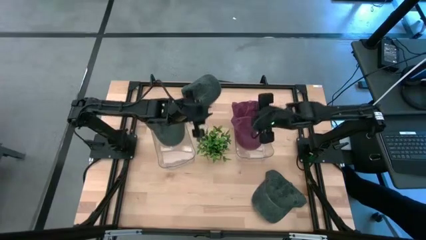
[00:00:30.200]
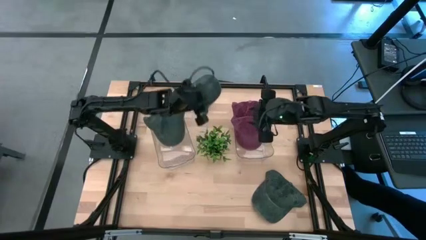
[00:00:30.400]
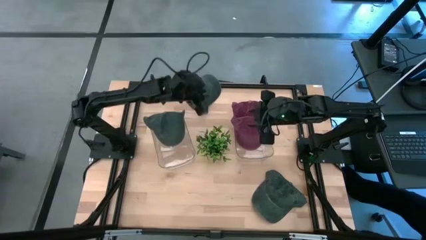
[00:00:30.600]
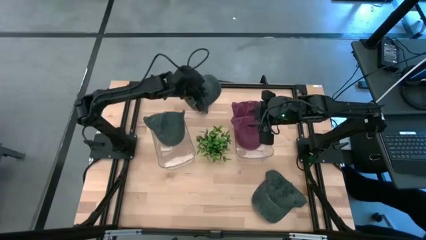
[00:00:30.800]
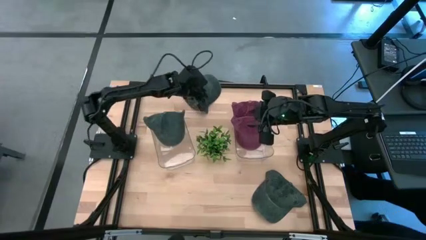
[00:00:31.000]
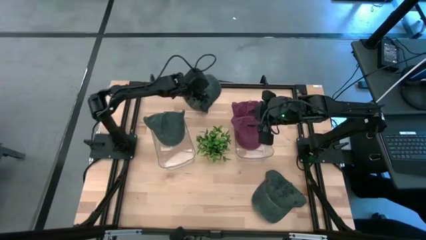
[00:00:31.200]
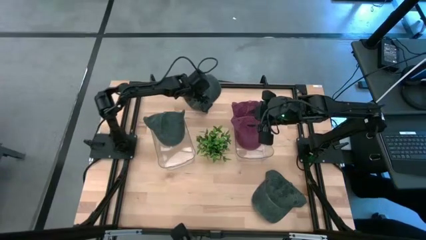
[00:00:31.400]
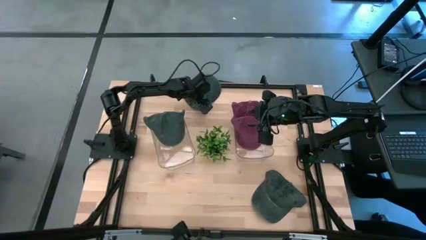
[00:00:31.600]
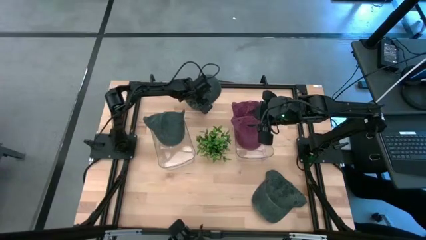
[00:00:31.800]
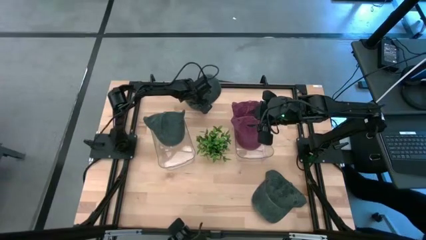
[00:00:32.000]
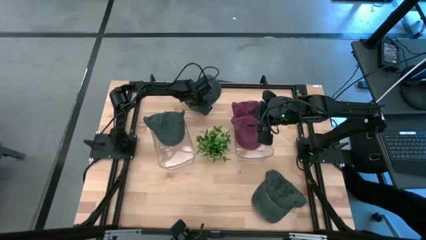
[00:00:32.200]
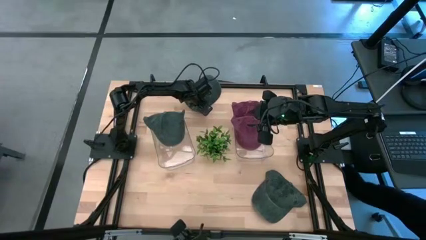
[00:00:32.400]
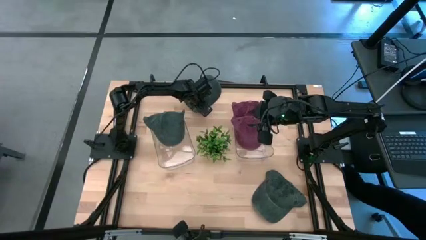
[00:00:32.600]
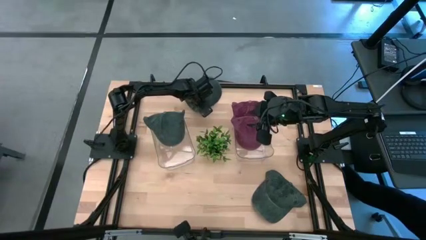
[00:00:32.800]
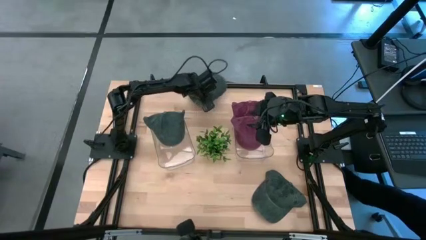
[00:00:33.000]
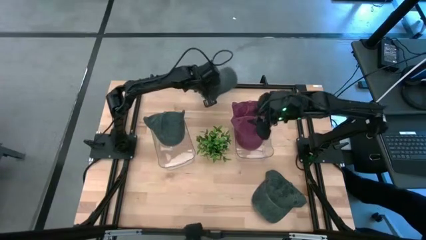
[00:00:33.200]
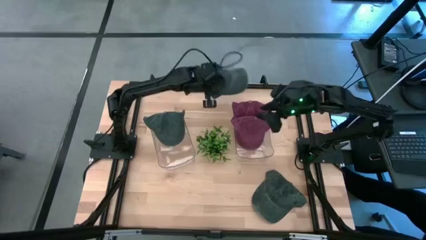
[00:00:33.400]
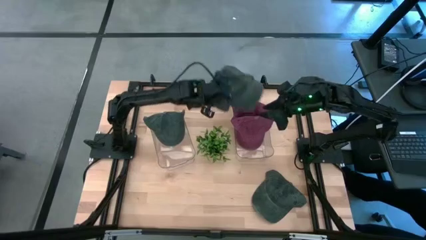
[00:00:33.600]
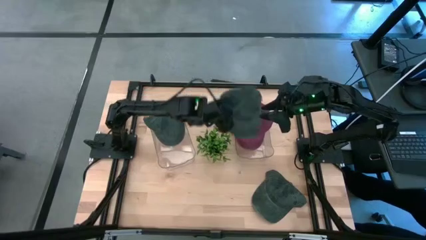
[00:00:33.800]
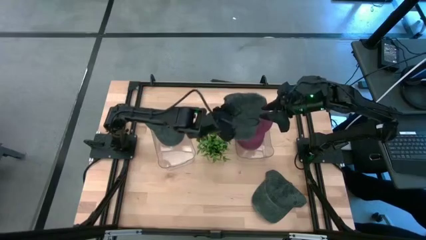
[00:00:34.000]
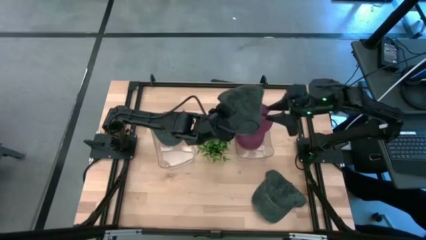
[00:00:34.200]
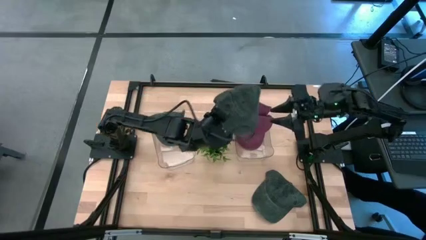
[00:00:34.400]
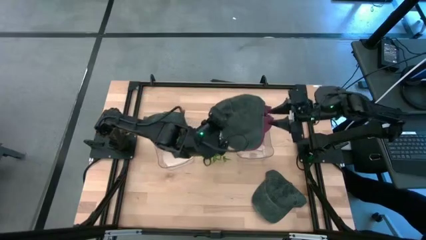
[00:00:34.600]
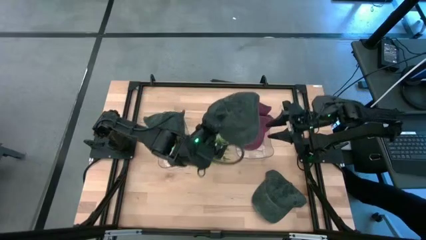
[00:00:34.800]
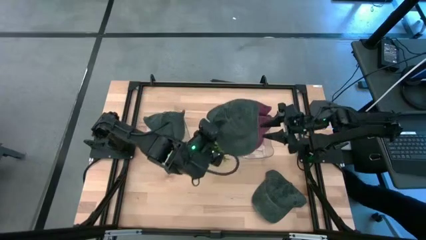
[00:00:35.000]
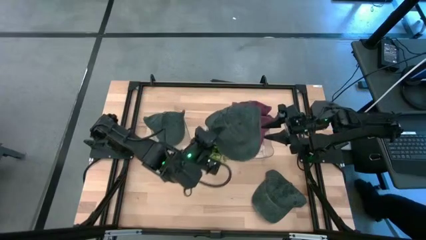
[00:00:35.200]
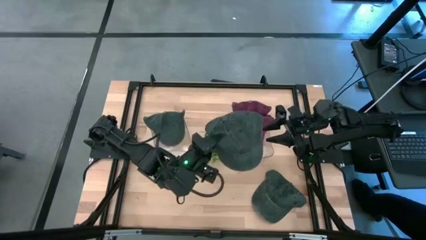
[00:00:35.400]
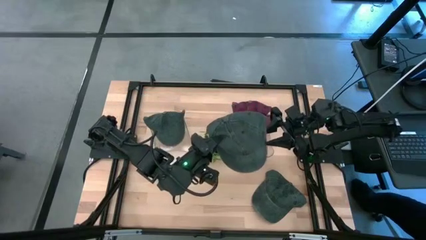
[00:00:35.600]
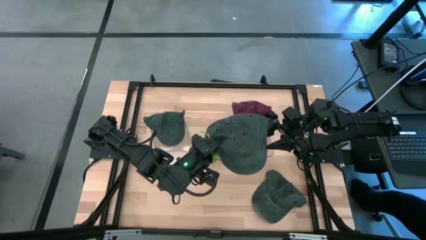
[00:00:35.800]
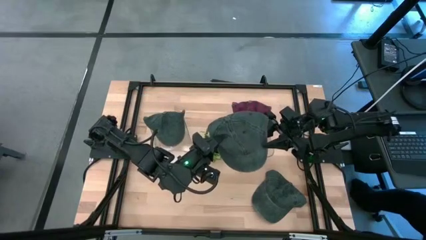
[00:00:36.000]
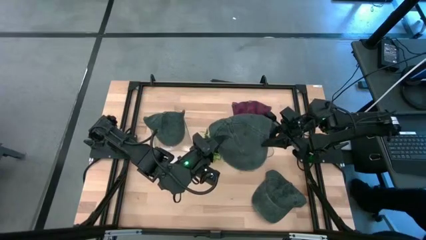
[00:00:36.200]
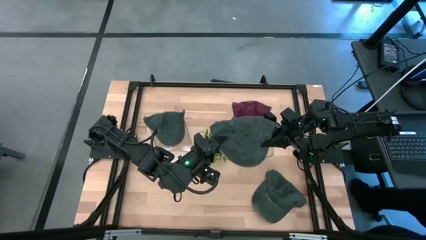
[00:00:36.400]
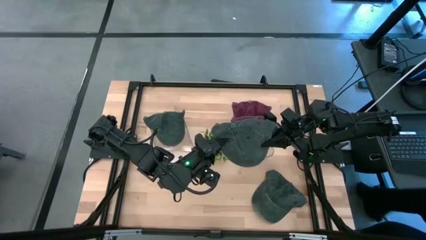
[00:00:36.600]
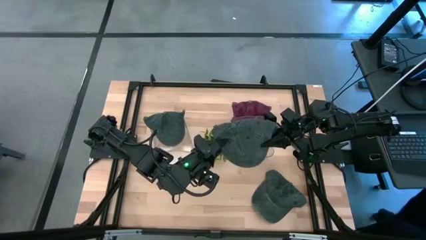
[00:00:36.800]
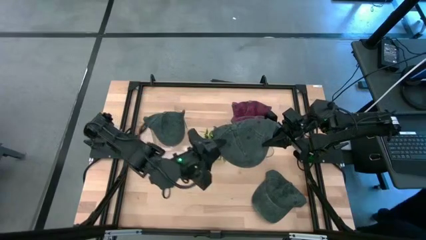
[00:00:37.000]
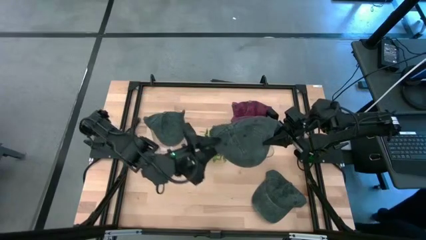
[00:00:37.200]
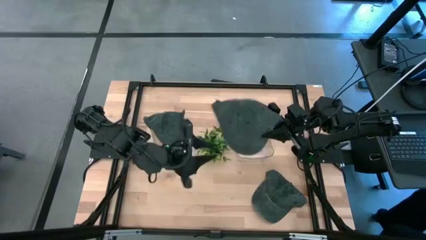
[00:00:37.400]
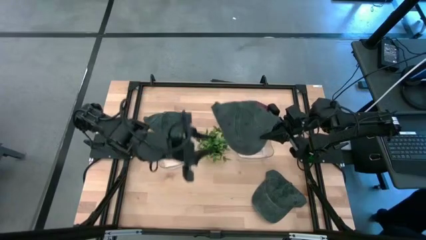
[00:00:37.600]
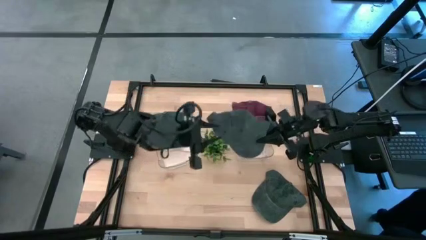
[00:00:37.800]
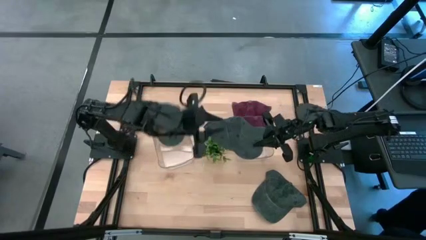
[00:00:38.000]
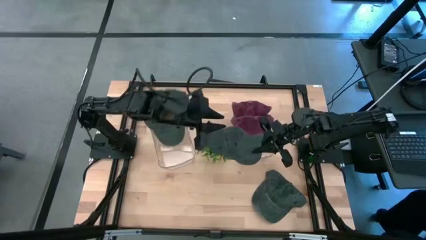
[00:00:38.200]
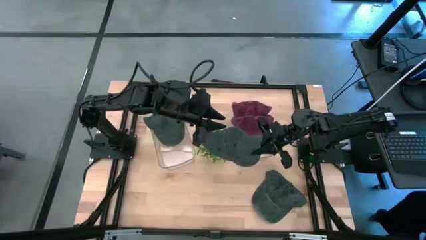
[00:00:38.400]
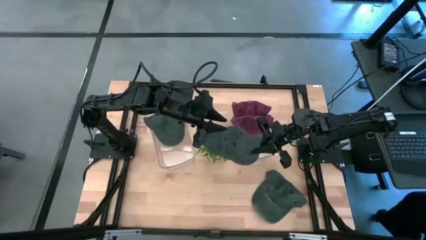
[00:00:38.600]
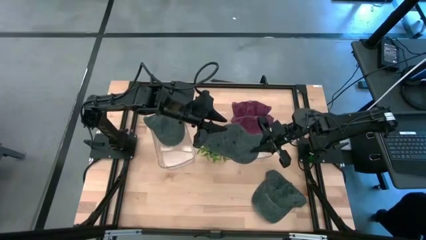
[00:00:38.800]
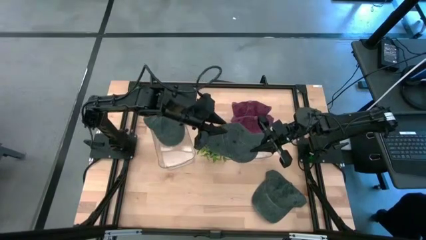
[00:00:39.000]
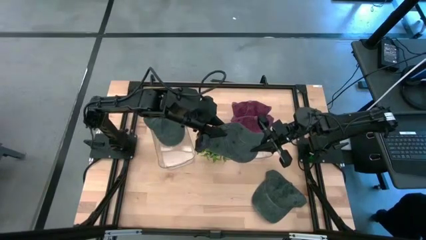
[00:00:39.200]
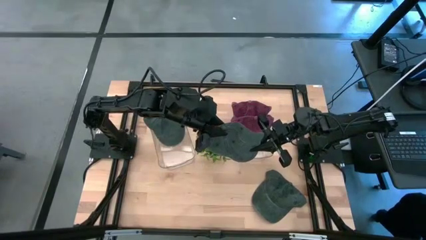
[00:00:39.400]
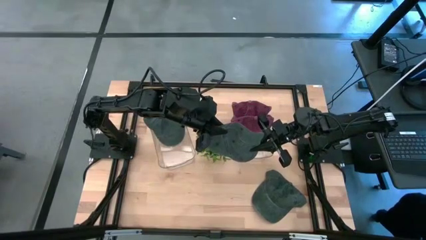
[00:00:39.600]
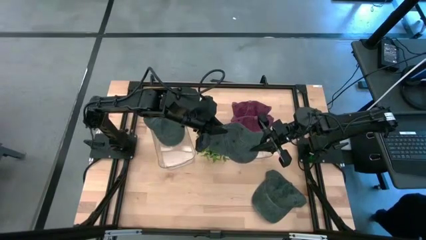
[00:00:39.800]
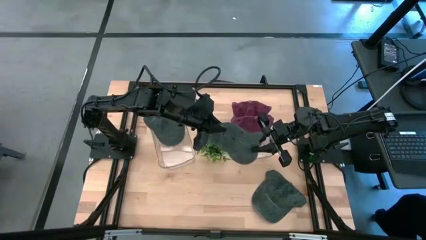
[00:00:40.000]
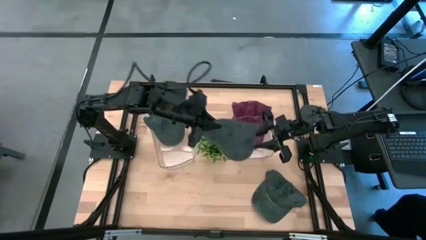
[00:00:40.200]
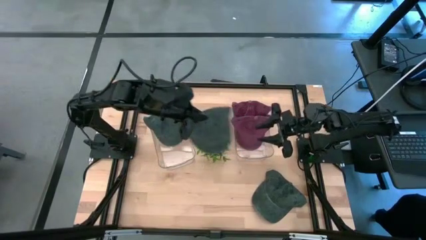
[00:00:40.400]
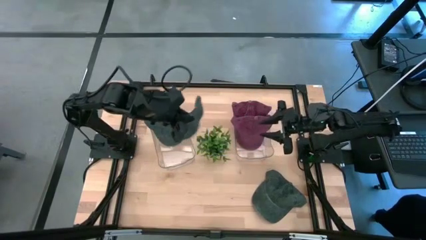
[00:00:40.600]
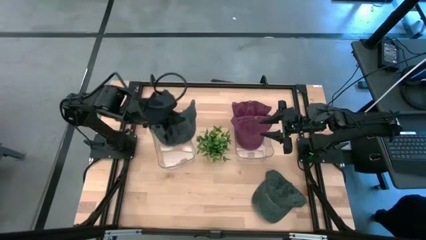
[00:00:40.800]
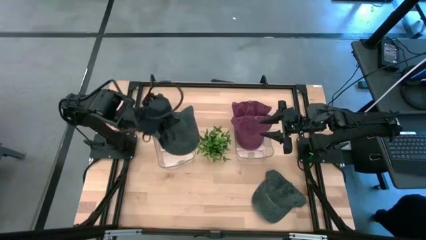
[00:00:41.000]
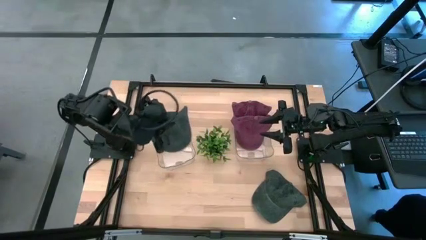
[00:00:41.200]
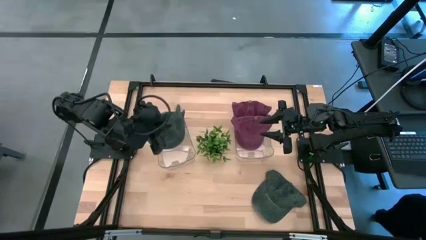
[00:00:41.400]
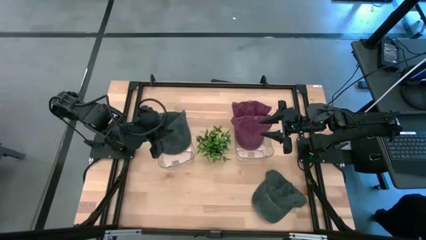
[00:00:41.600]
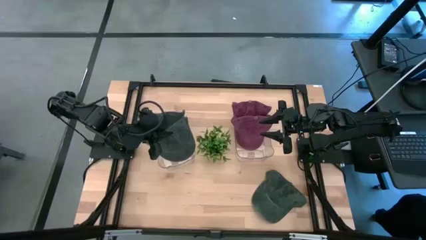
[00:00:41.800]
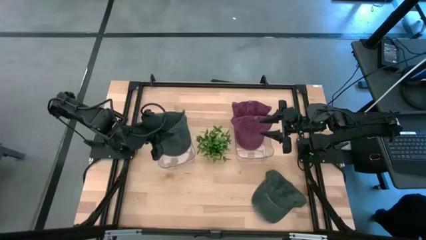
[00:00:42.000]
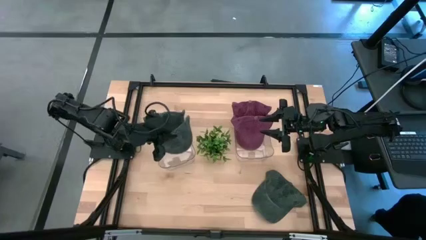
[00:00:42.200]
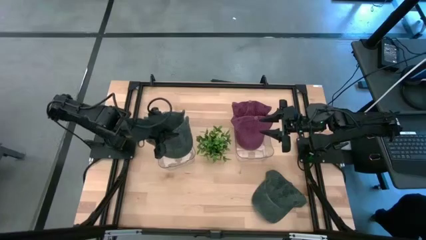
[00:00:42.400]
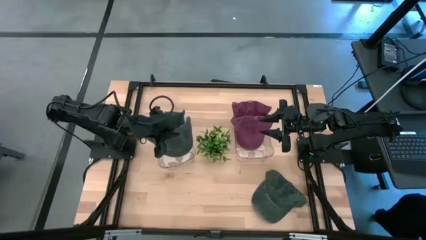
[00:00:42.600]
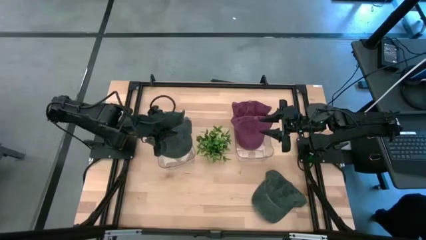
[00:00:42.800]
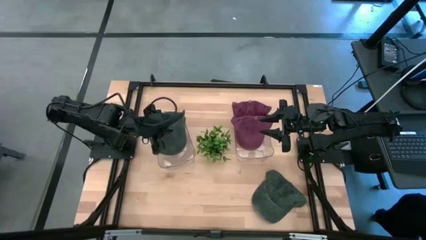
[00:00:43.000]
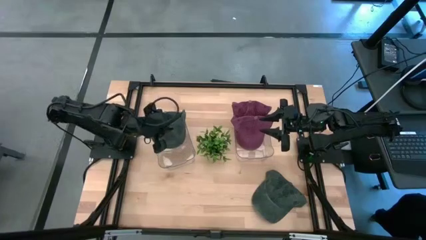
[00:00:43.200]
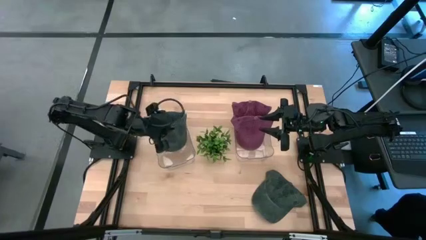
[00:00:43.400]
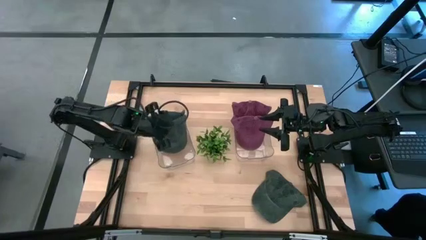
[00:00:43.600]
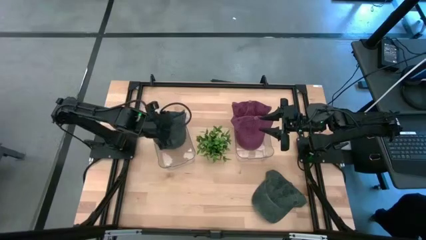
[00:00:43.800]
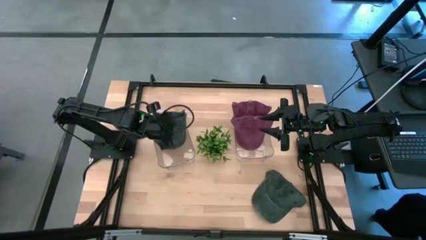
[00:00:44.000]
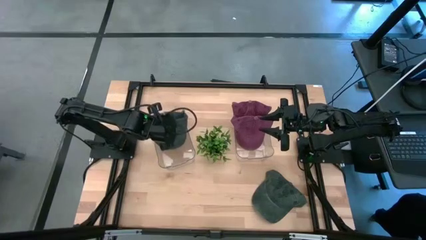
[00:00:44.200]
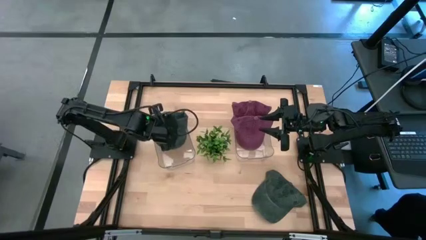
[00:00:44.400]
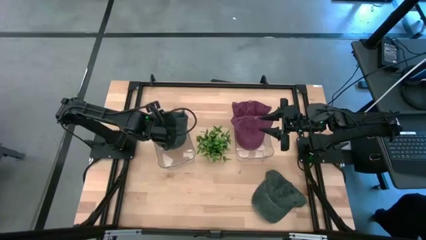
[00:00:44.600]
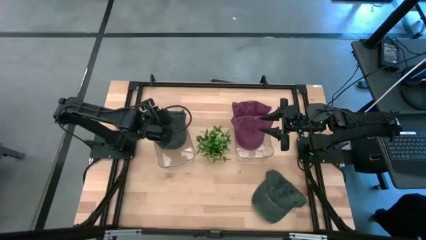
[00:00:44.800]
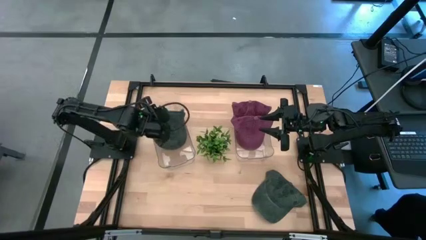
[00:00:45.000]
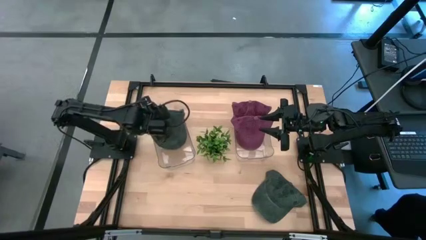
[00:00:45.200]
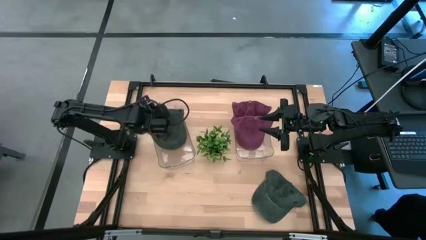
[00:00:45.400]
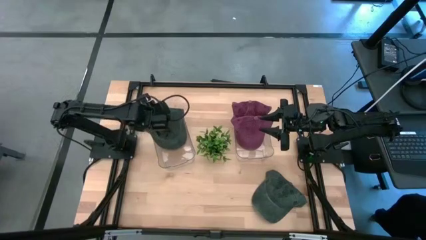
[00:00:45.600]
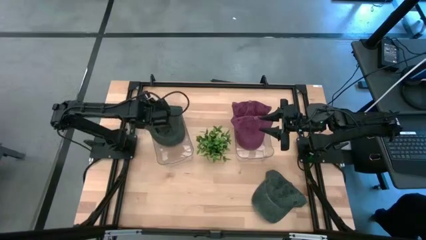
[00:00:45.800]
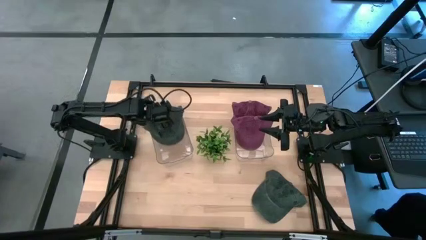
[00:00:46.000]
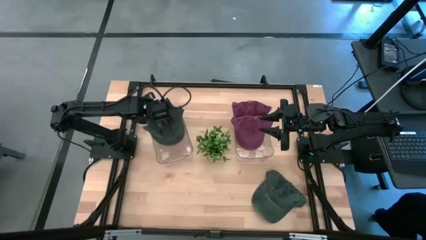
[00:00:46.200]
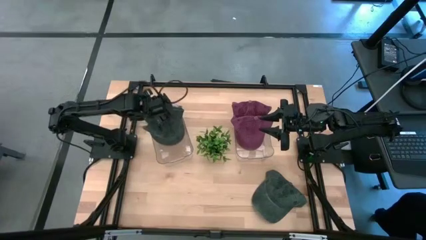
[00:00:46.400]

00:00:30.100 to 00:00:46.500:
Task: Pick & Place hat
Put the top black cap into the left transparent bin
